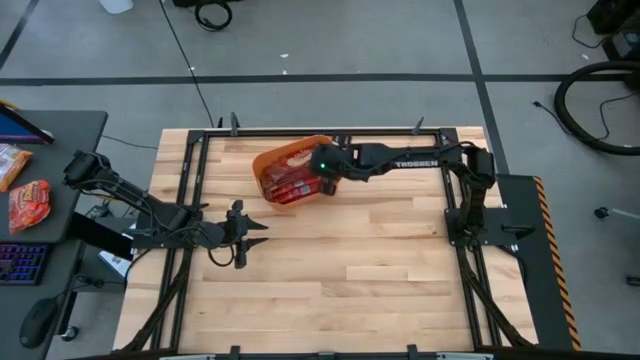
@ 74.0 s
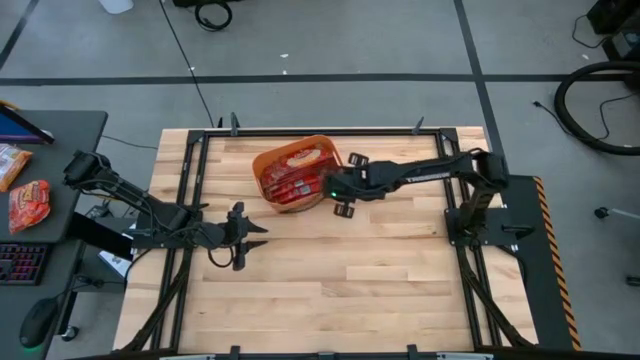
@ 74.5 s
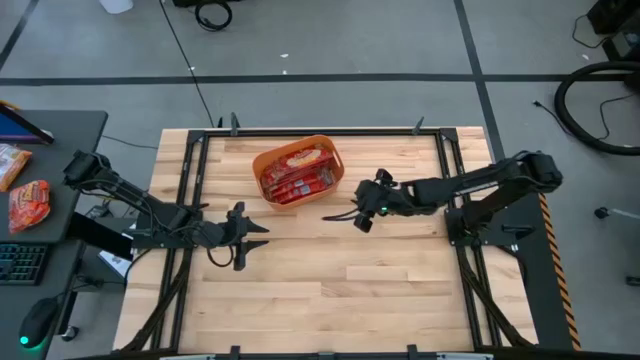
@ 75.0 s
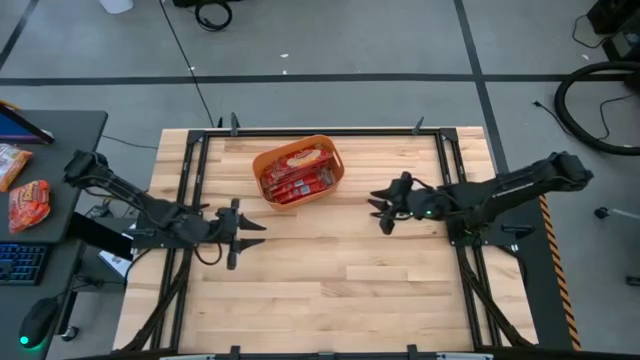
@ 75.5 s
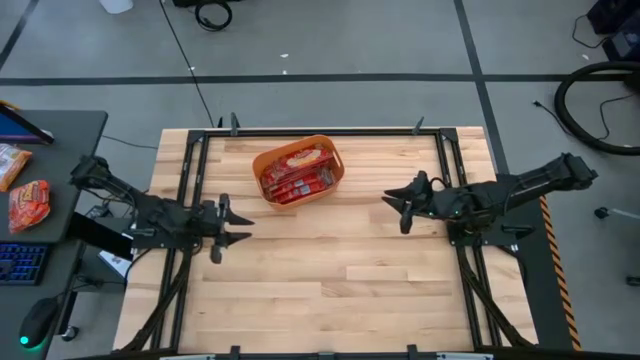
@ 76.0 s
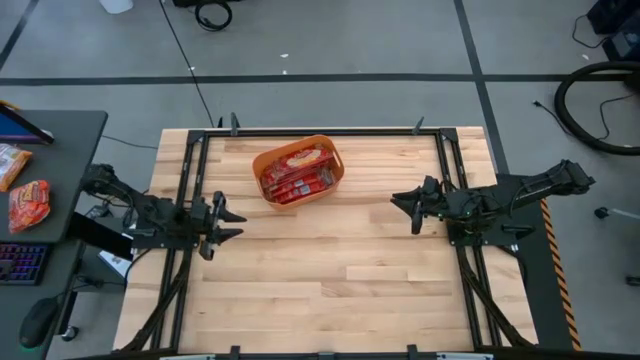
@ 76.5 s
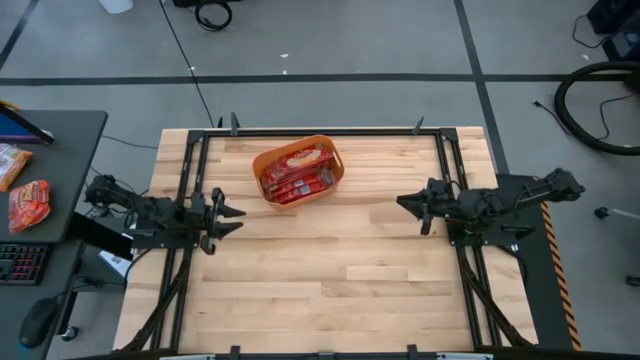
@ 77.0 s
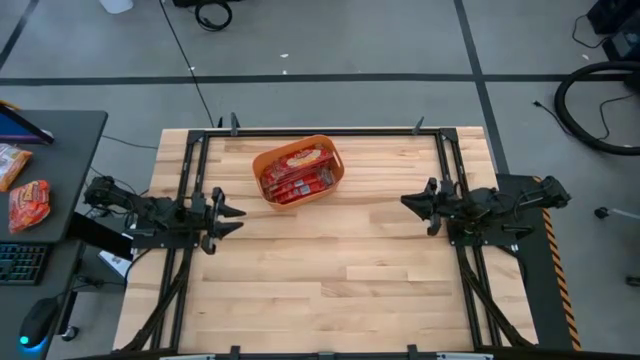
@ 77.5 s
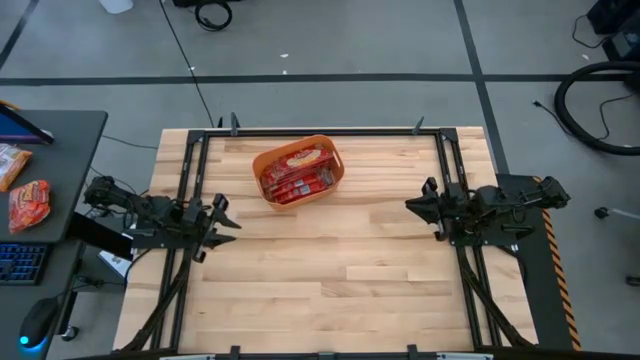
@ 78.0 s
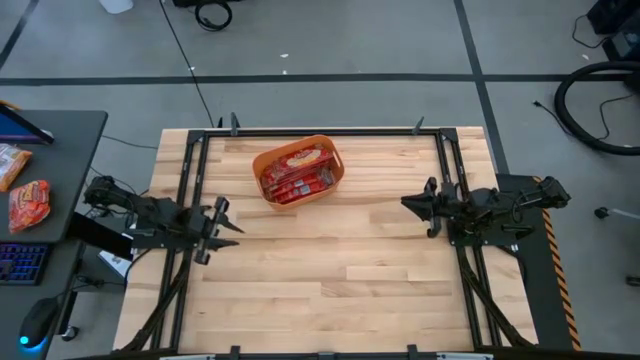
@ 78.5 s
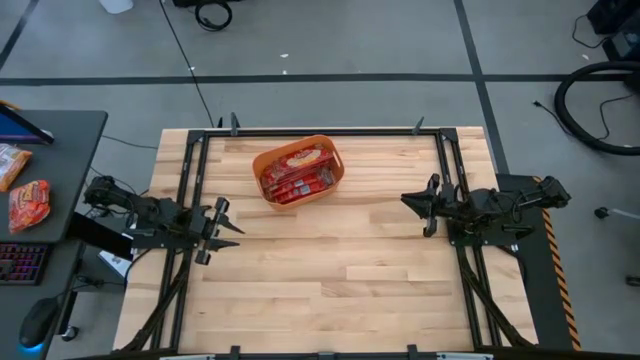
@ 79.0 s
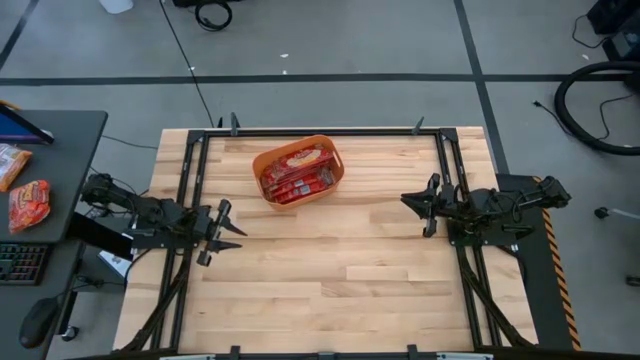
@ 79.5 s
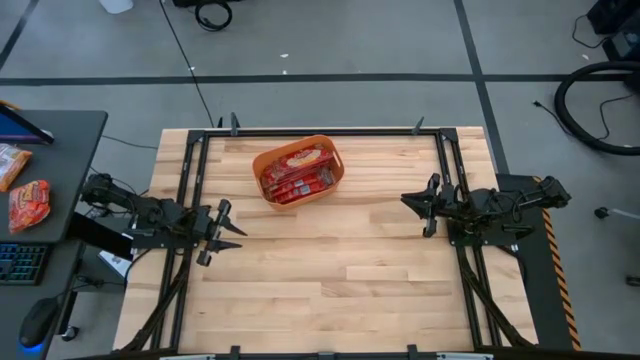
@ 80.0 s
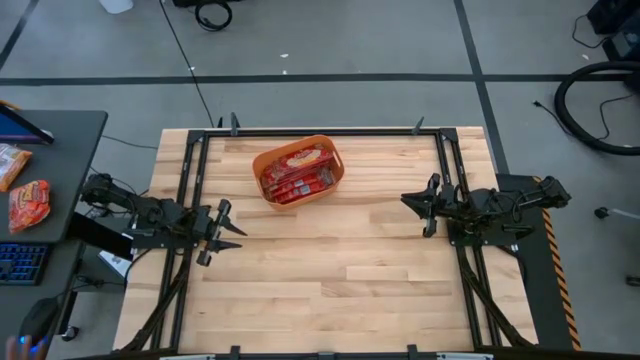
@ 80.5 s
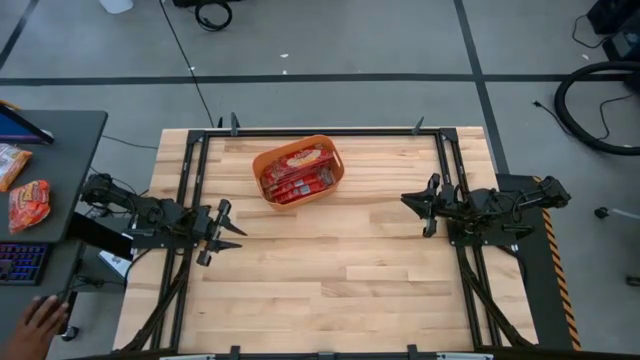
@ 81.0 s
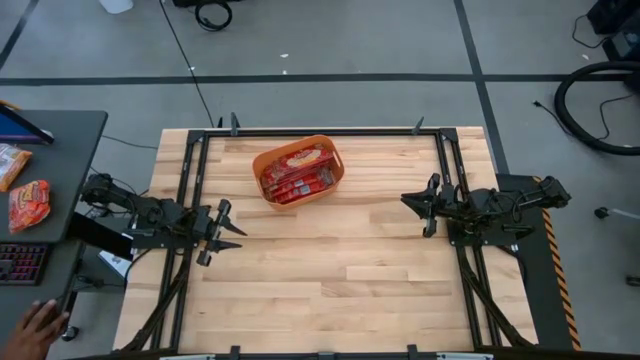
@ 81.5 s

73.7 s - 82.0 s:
Task: Sort popcorn bags into baskets
Return to Home Position

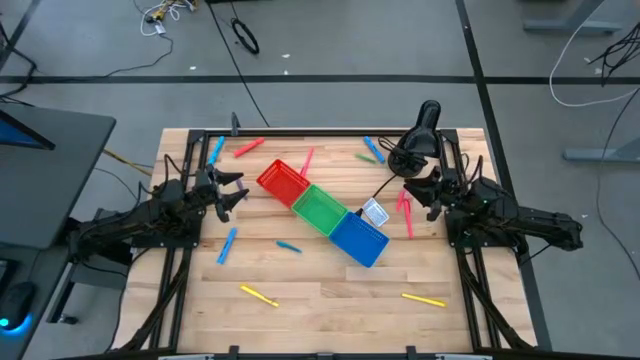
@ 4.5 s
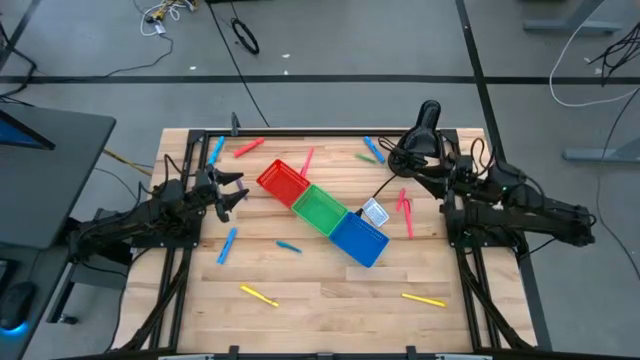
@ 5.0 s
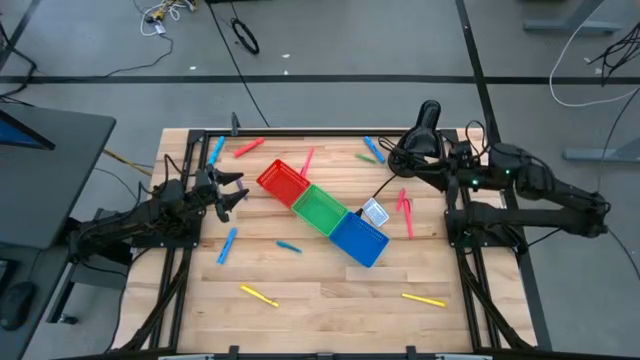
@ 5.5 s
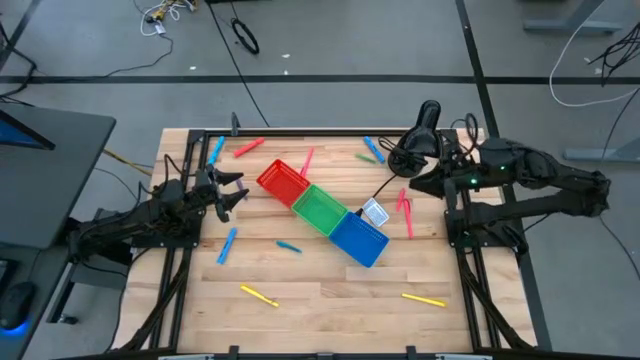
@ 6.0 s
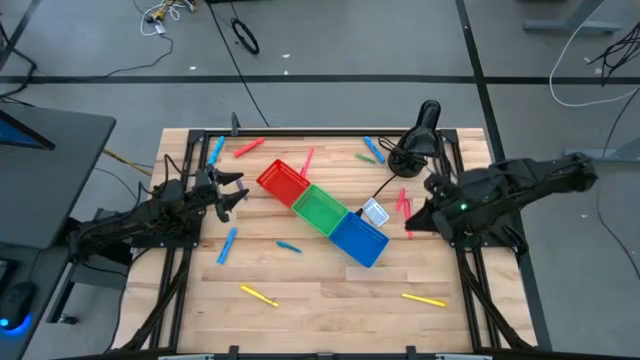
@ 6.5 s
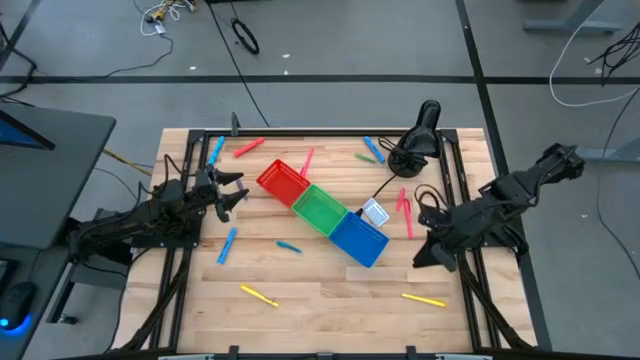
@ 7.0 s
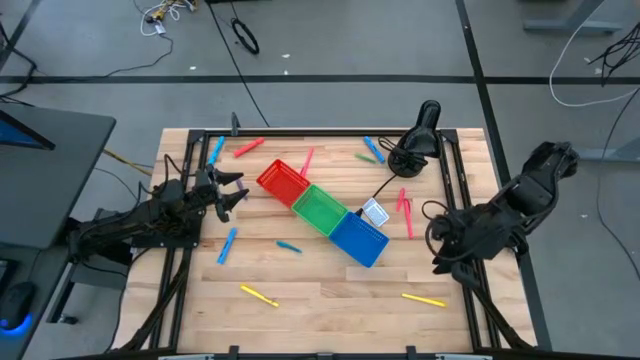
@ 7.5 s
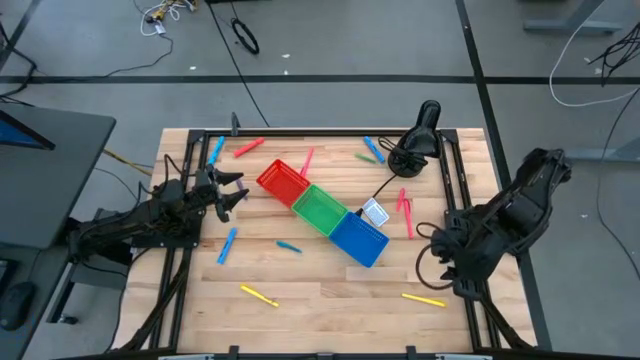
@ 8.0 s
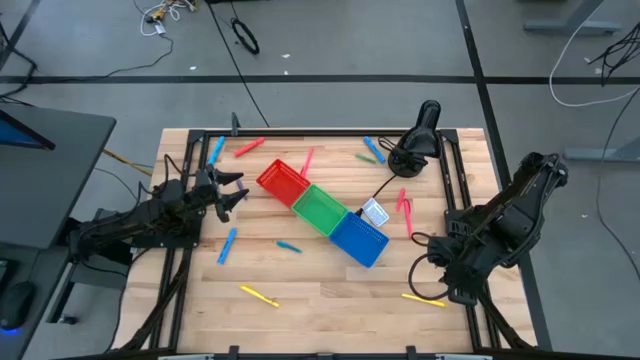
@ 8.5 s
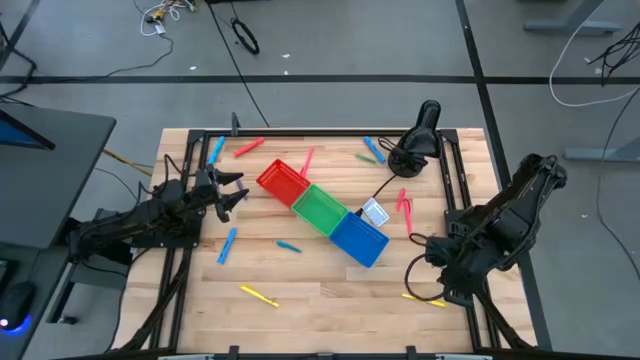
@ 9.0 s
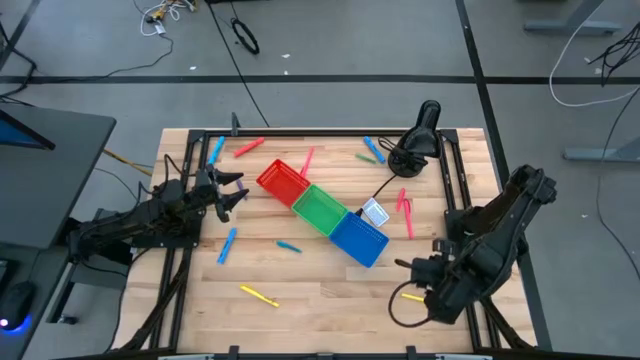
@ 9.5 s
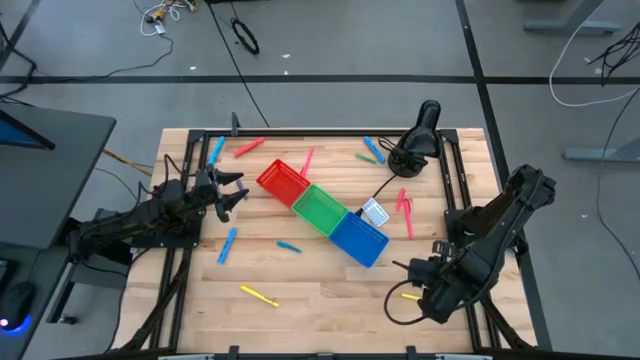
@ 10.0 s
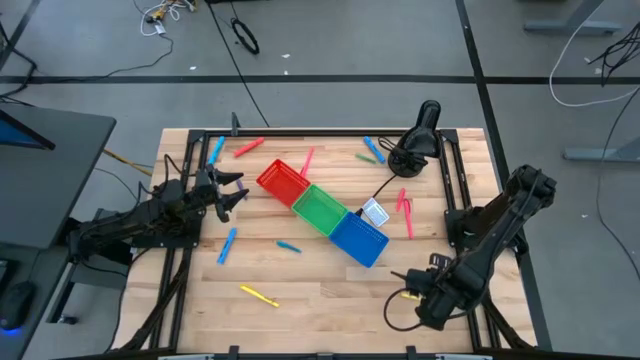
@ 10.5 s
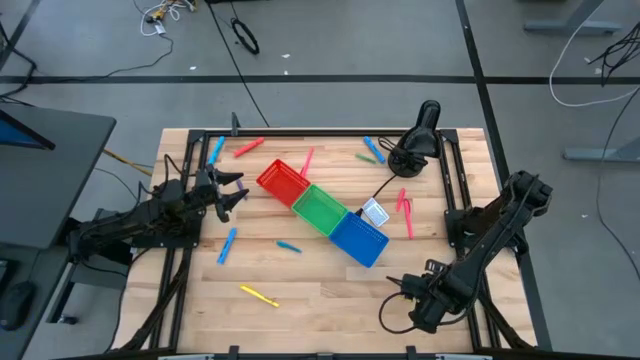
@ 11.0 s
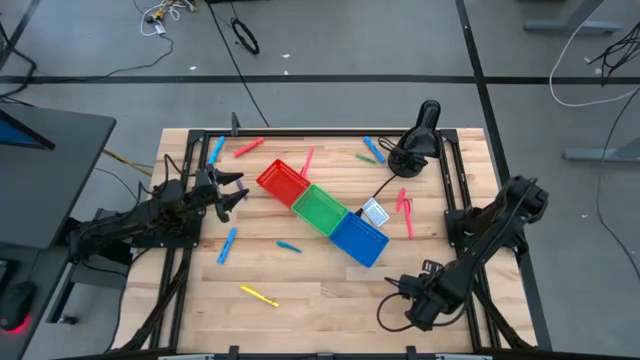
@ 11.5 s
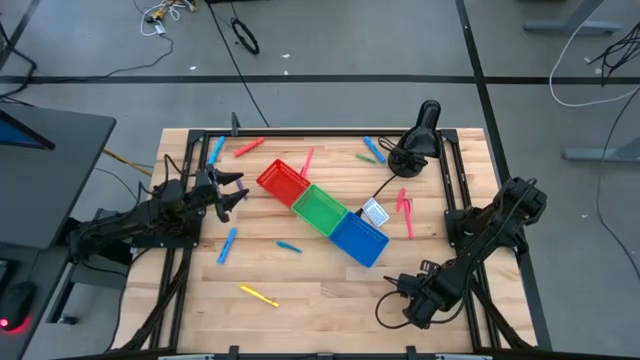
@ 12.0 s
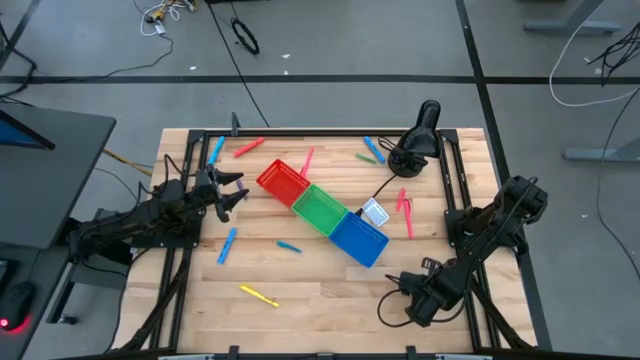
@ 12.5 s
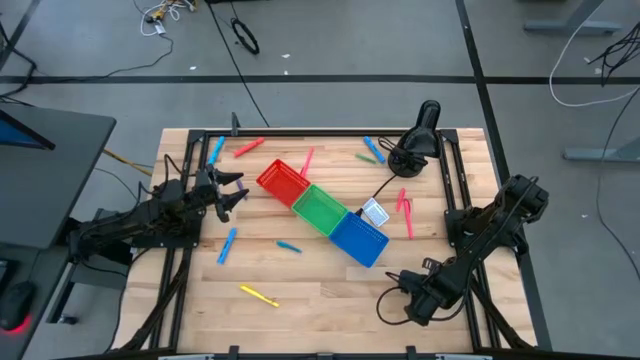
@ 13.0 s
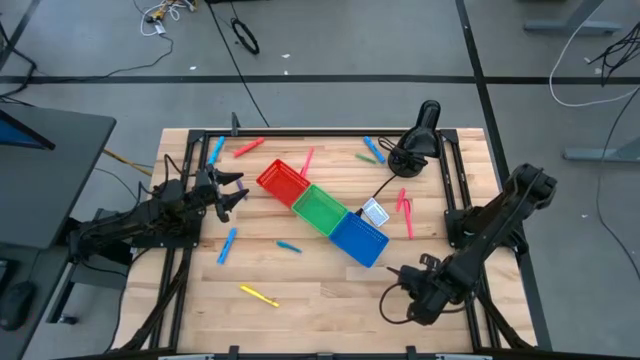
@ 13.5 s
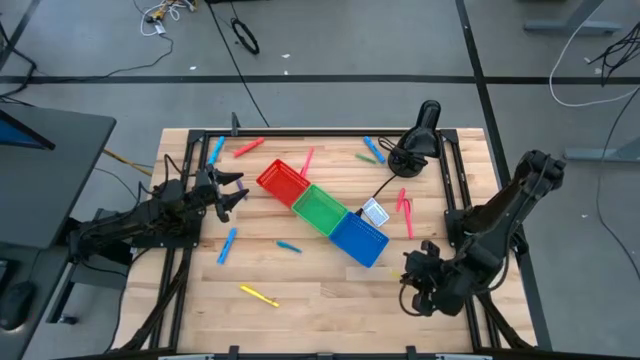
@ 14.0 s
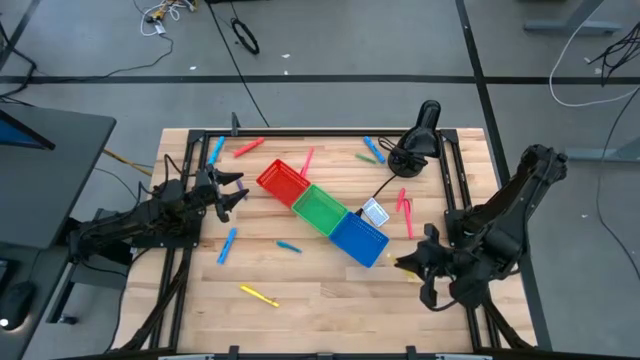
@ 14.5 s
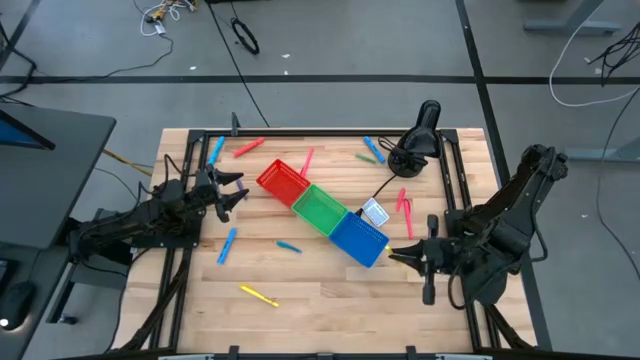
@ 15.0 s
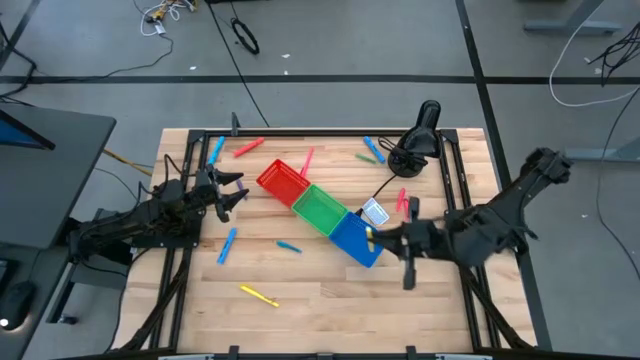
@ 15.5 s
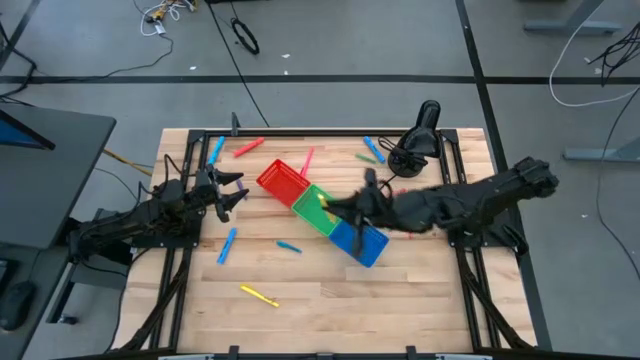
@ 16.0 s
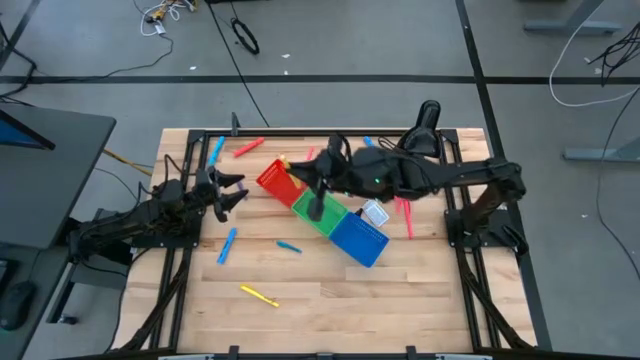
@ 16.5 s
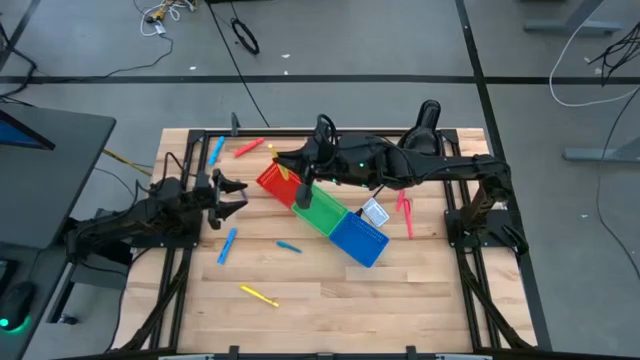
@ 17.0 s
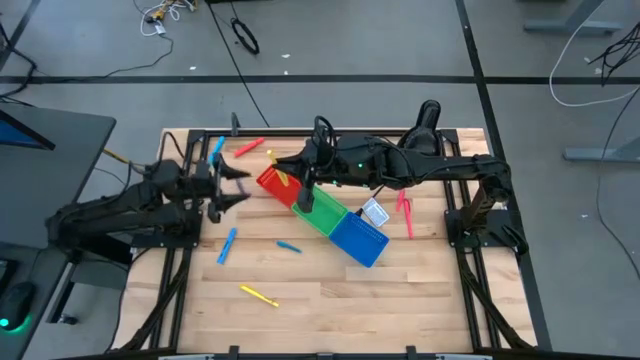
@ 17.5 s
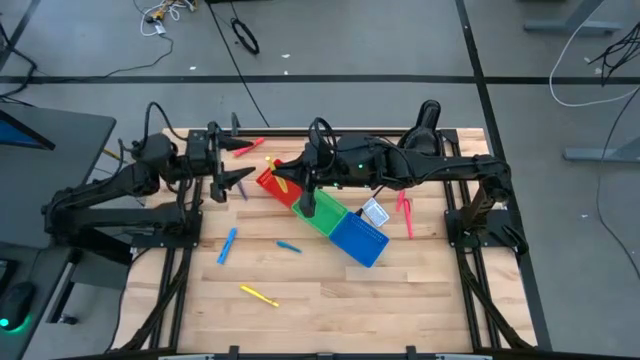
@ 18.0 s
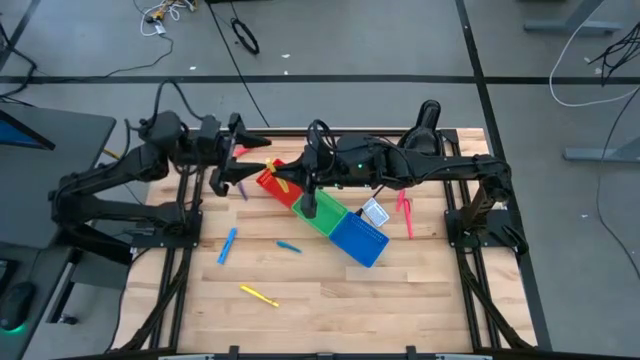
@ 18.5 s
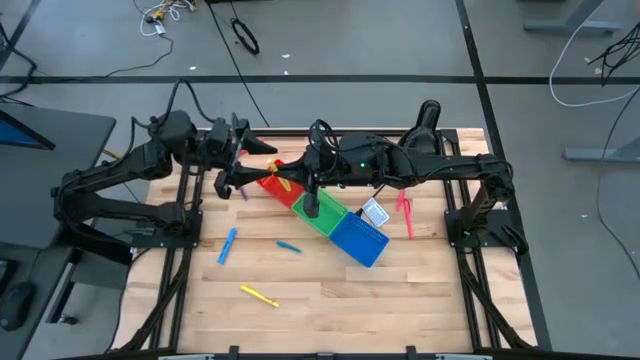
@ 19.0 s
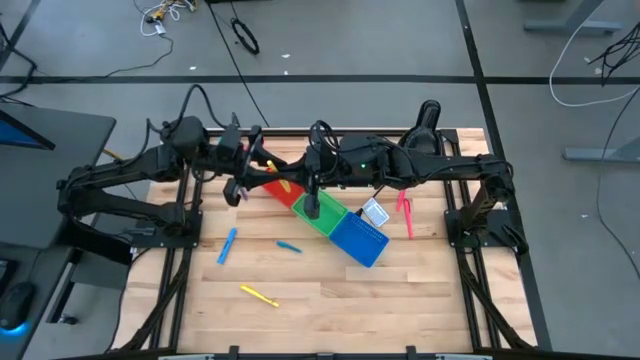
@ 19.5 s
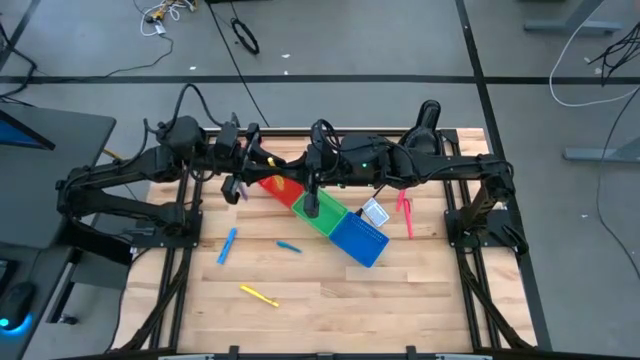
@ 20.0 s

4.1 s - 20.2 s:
Task: Pick & Place Markers
Put the right yellow marker pen into the red bin
